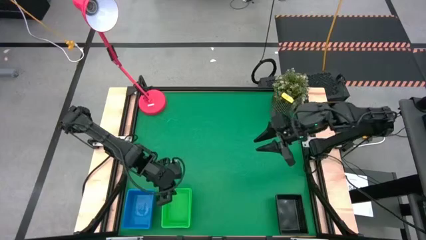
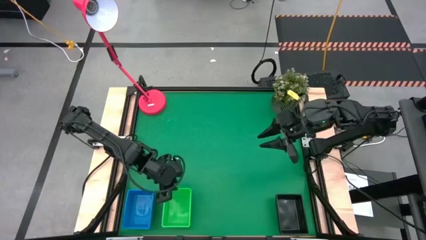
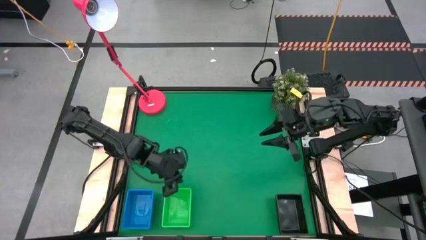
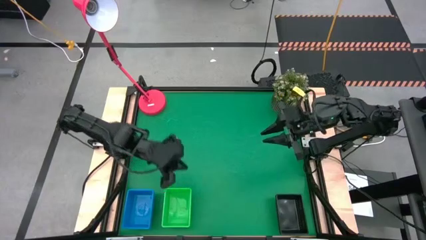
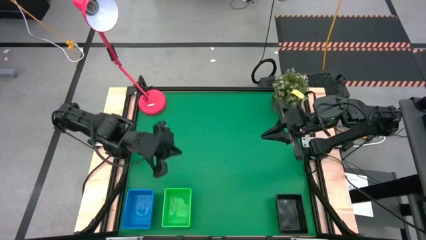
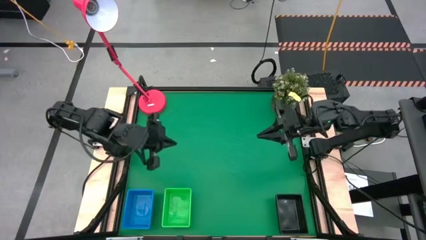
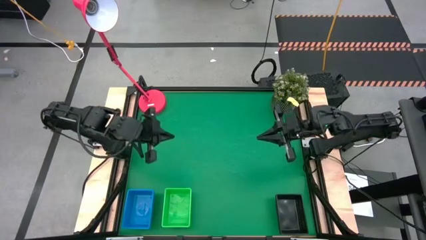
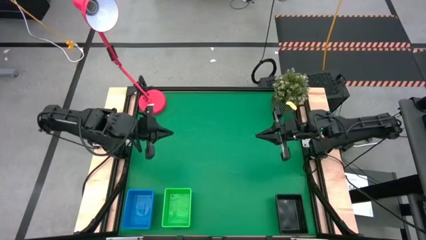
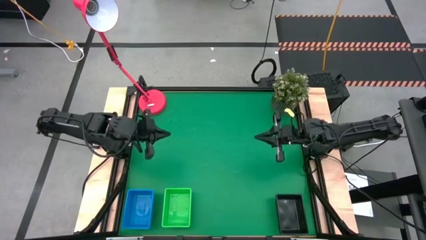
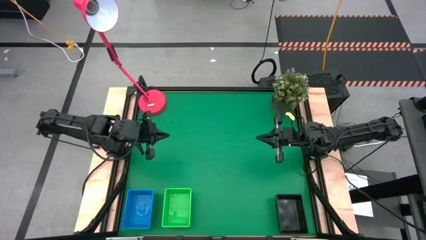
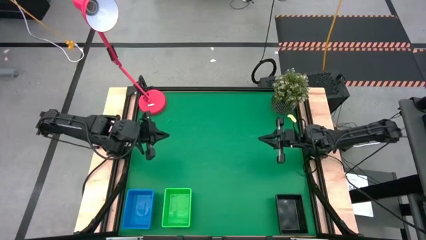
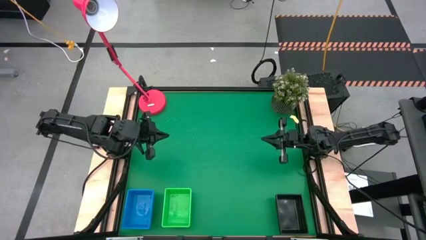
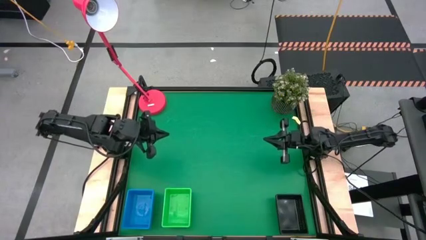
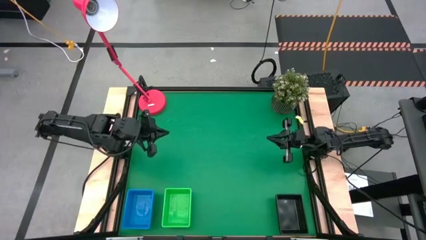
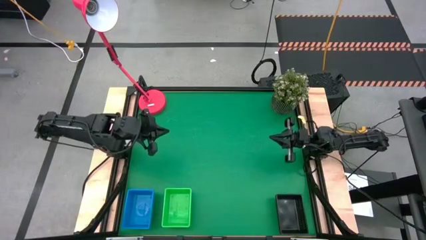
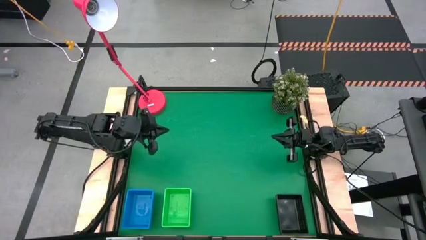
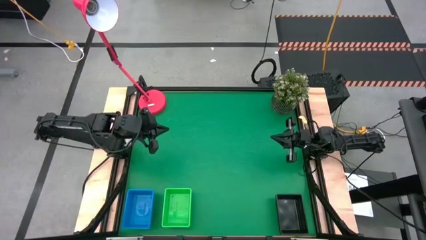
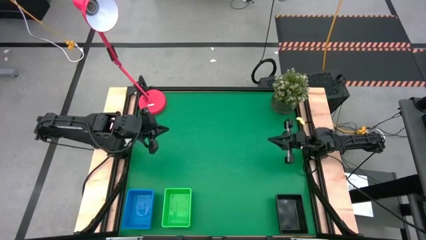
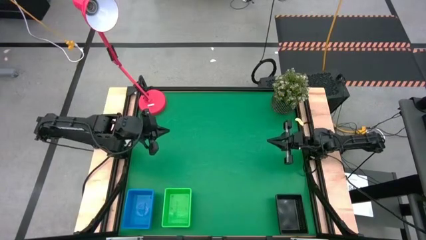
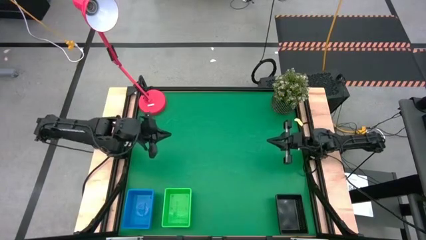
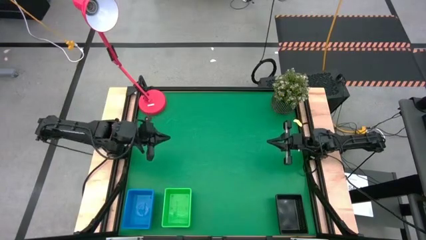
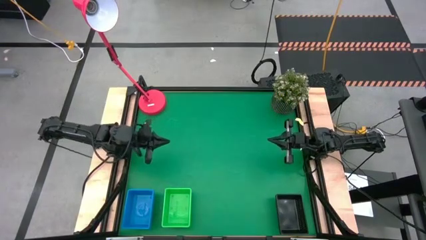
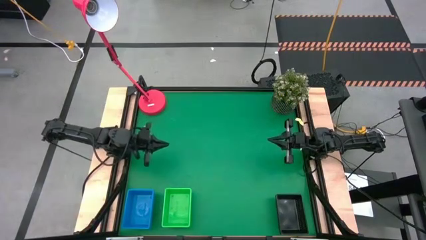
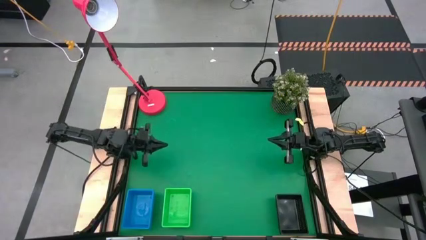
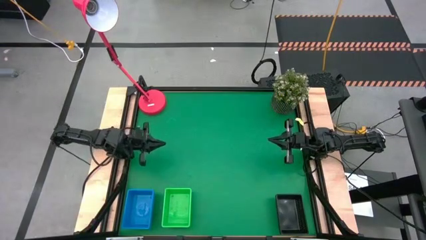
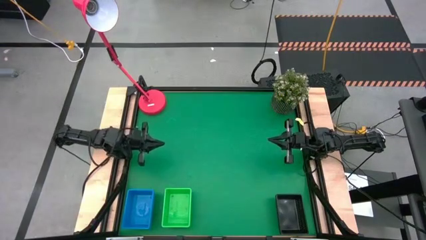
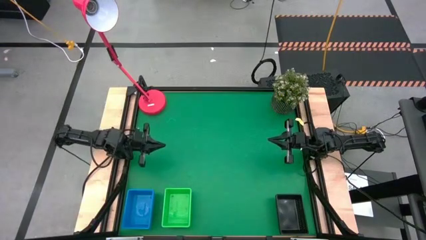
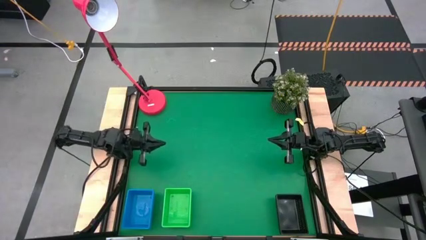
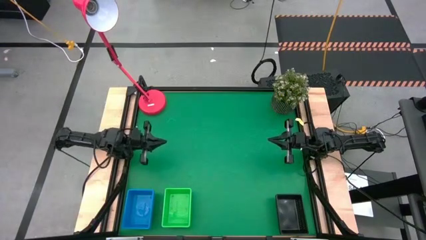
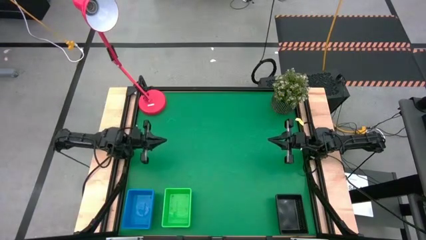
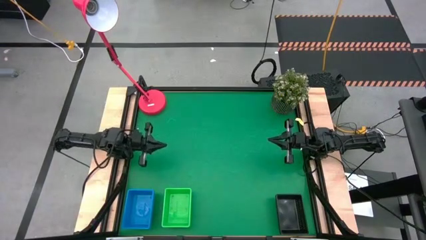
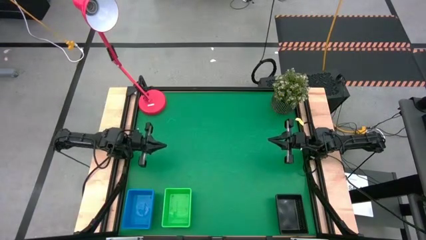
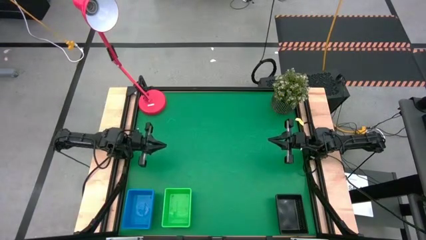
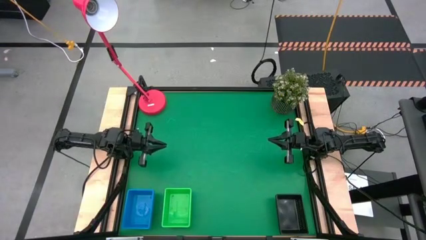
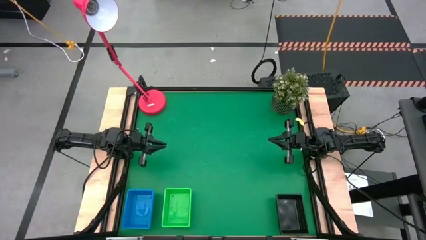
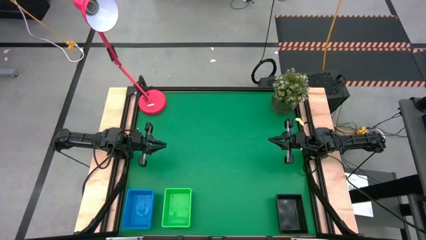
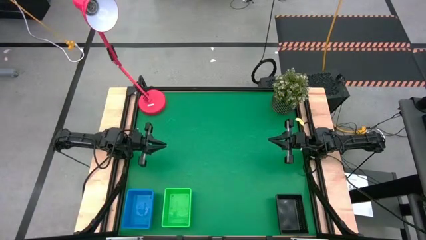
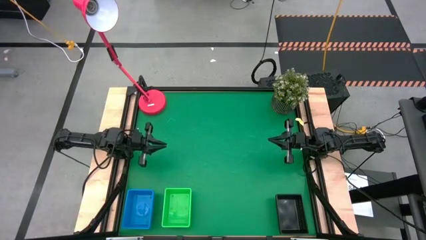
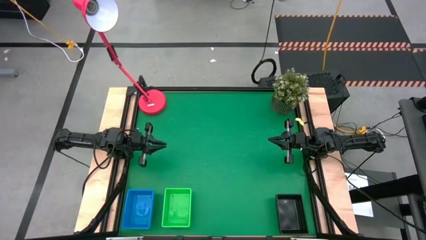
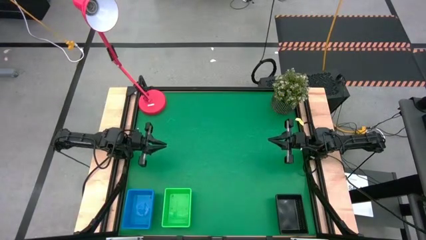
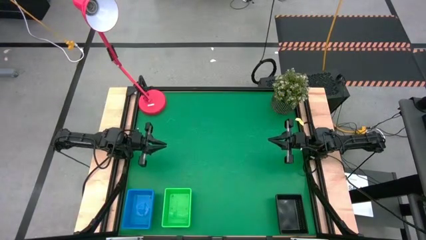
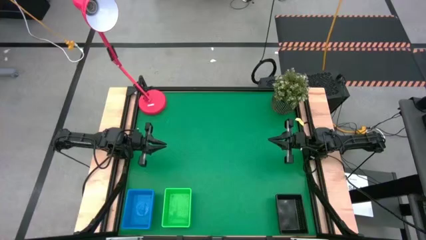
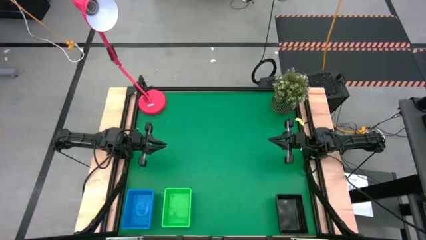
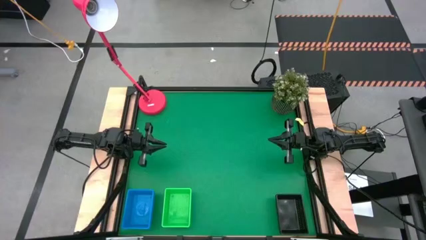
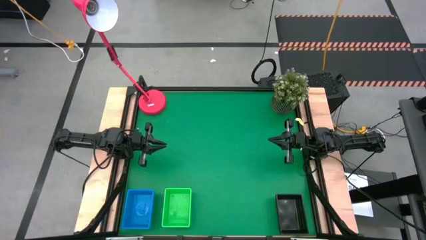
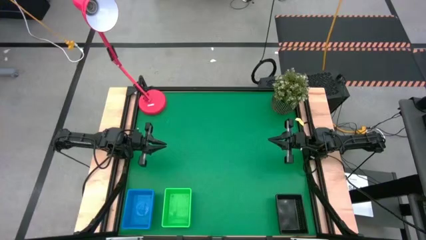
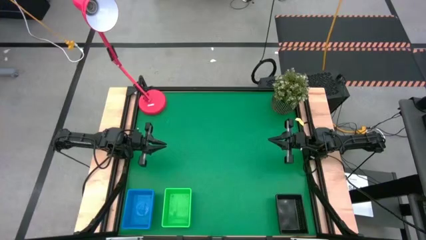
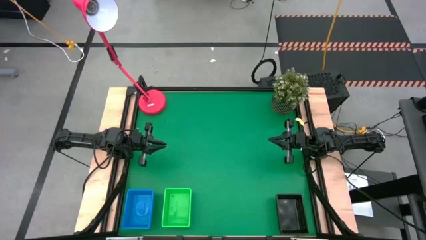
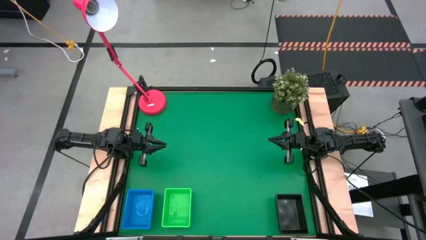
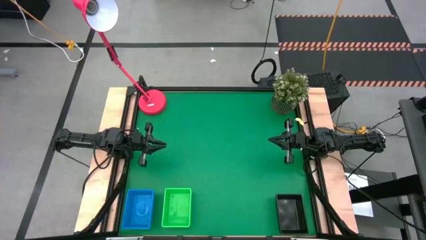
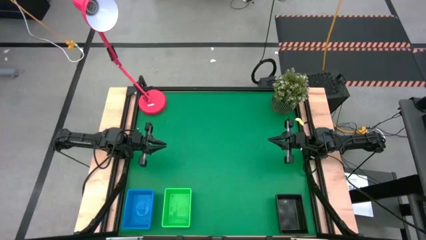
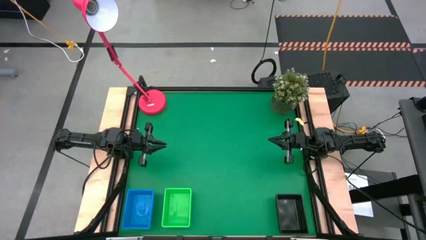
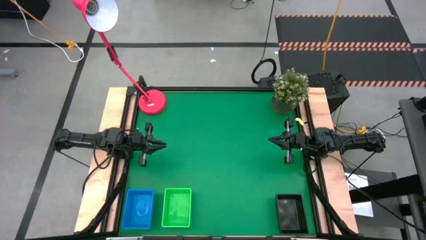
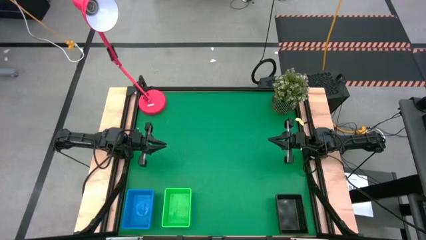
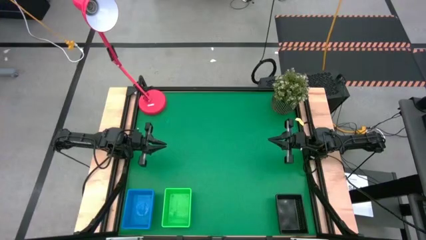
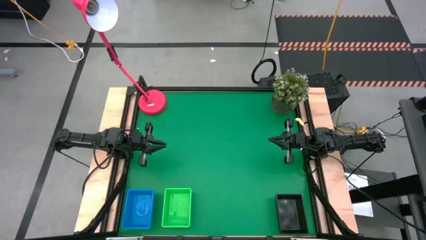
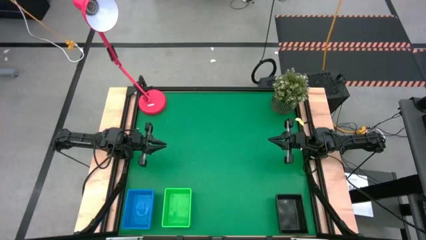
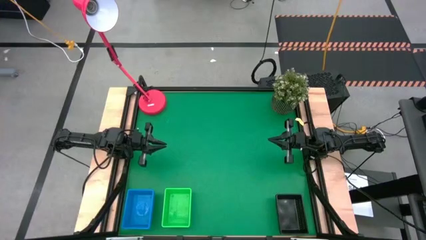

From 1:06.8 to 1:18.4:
Return to Home Position
